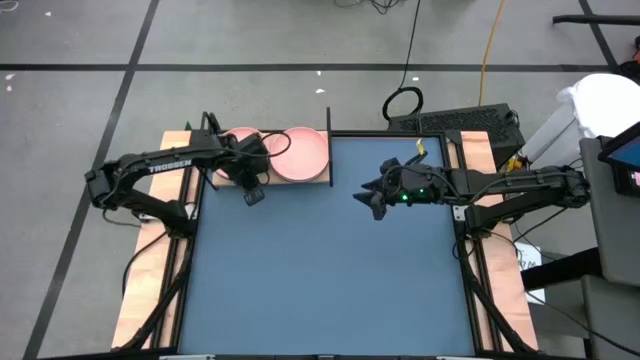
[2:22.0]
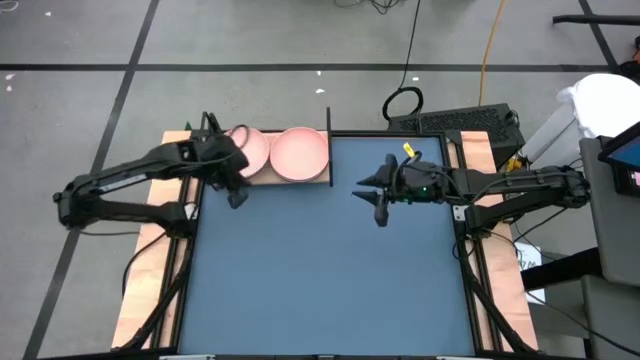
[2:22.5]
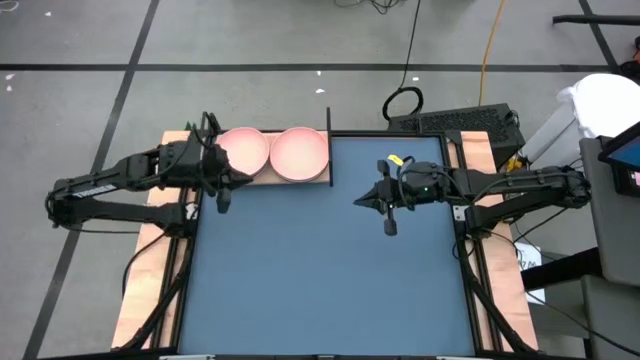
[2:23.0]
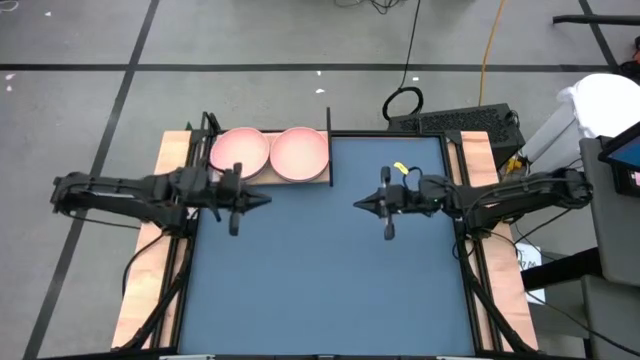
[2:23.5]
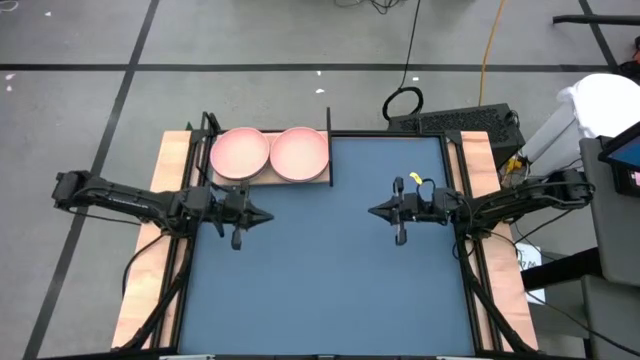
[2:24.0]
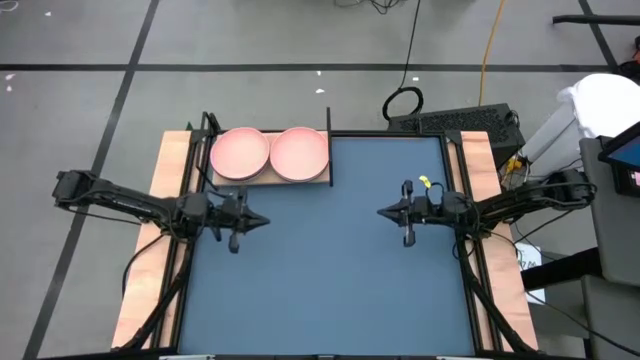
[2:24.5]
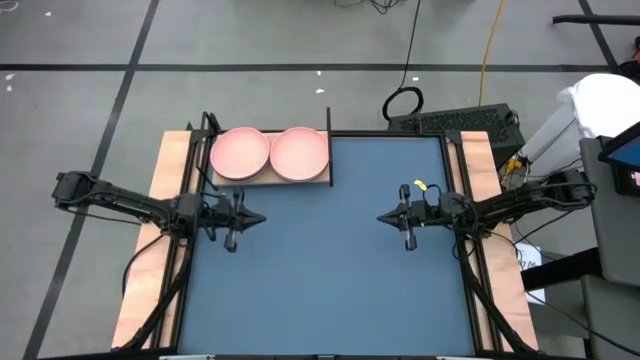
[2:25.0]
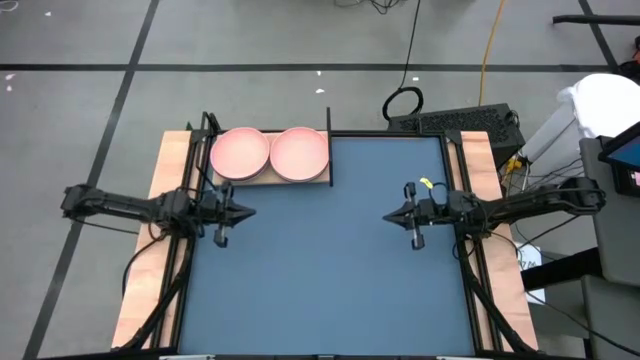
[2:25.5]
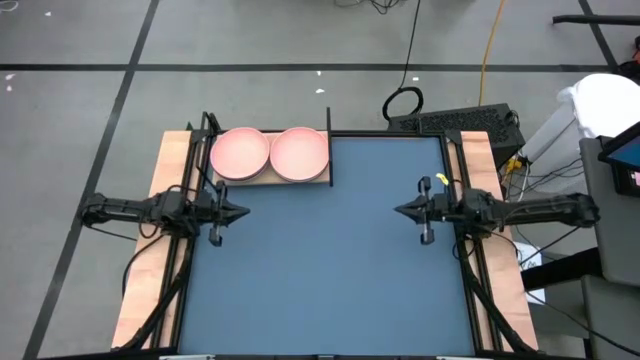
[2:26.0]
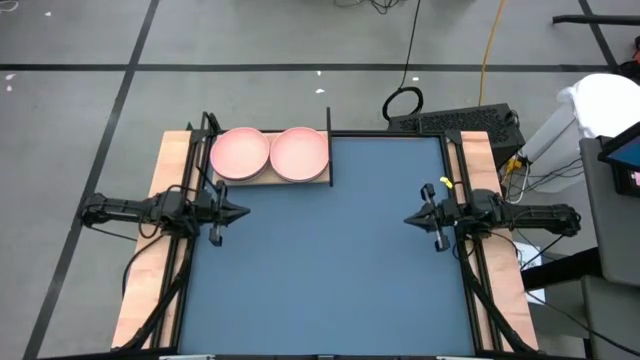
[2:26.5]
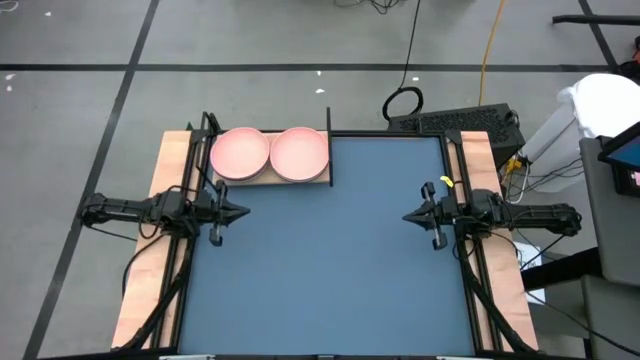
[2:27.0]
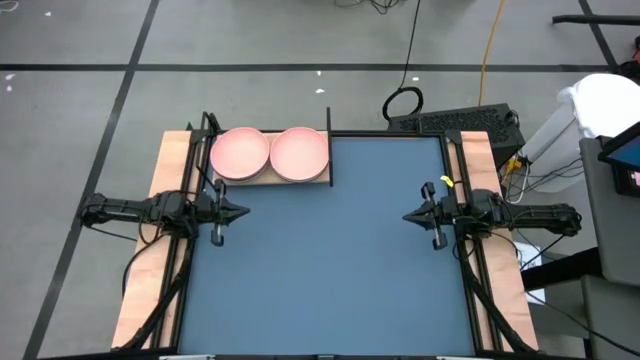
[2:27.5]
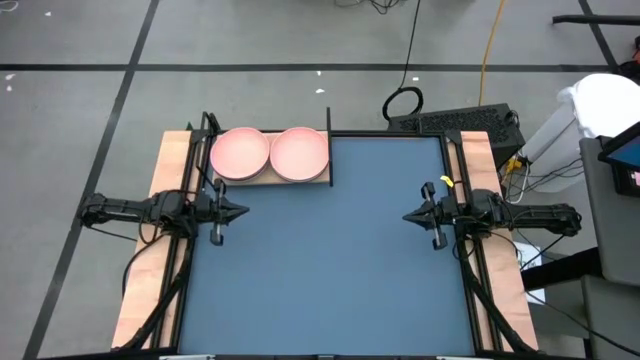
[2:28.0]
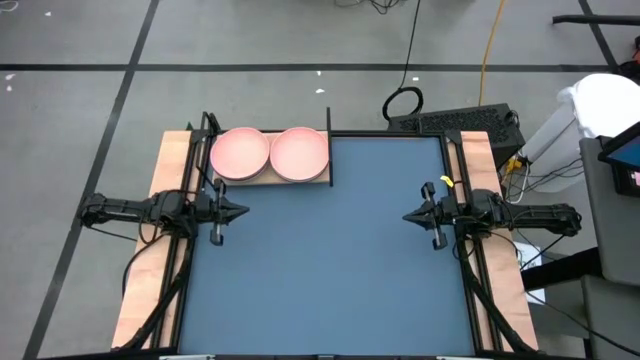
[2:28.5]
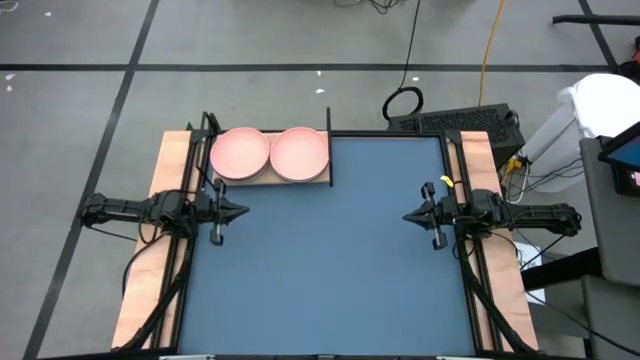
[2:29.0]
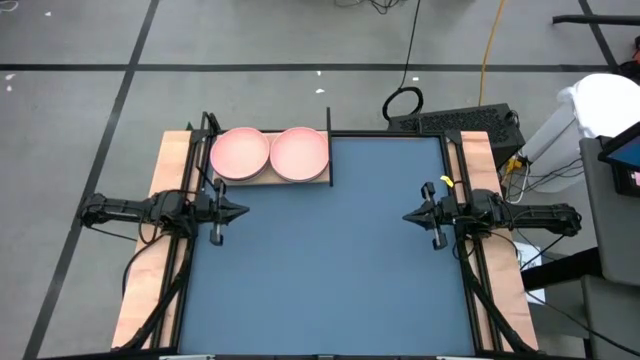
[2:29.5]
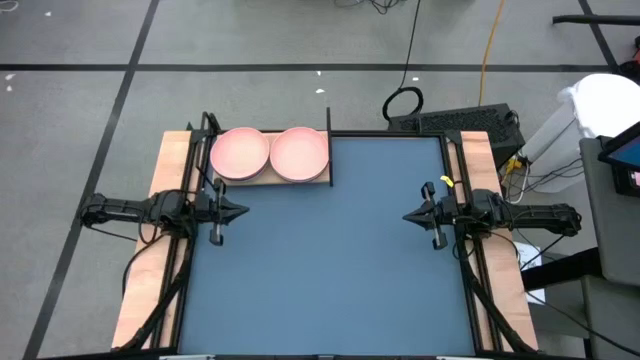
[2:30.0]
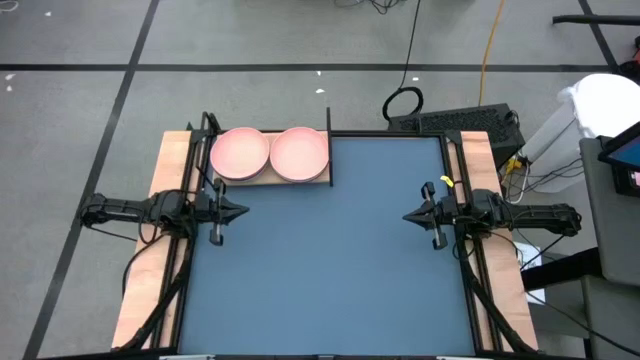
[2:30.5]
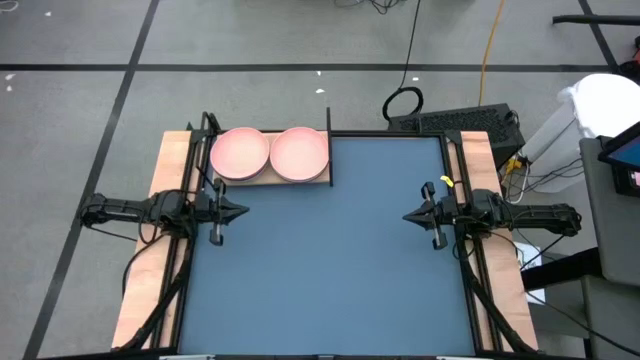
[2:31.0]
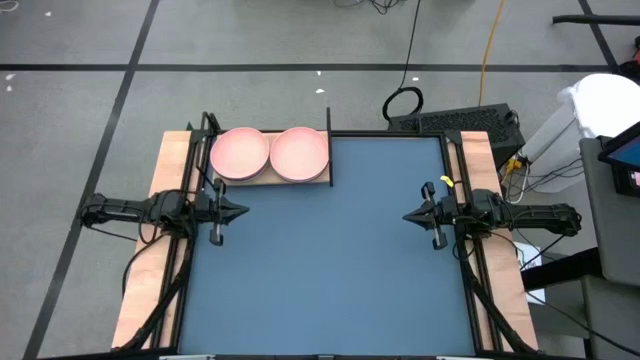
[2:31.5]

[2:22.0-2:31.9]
Task: Place and stack plates onto a shelf
Return to Home Position
